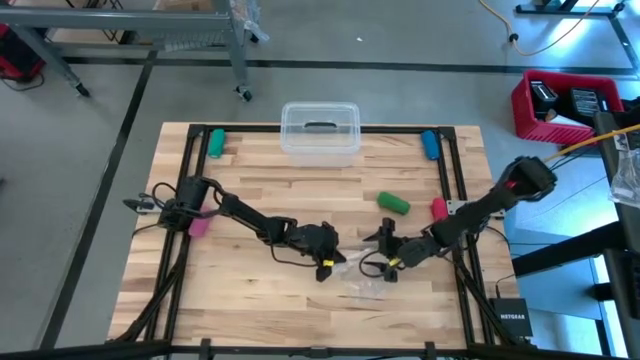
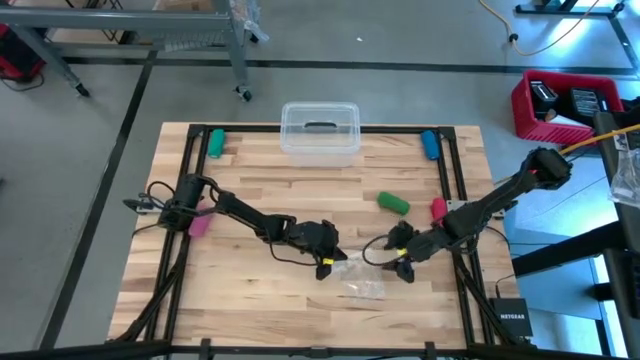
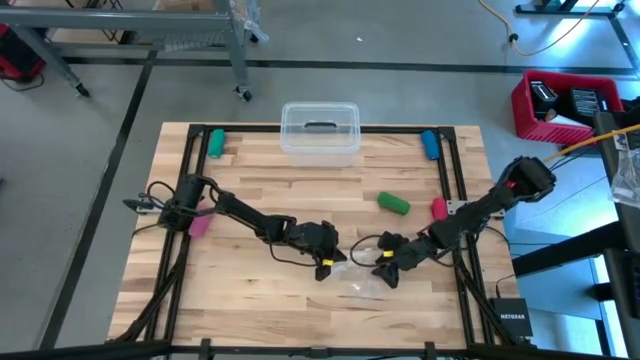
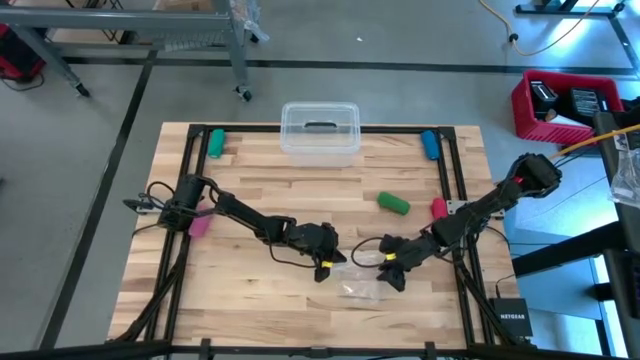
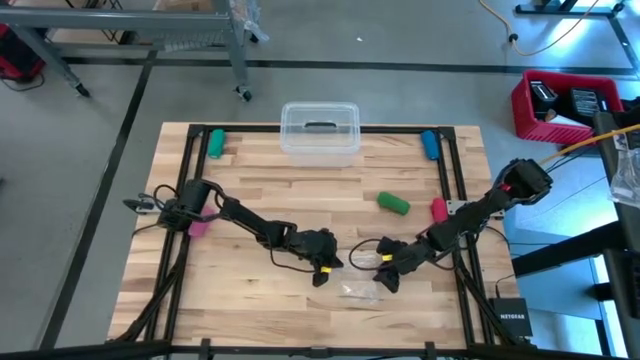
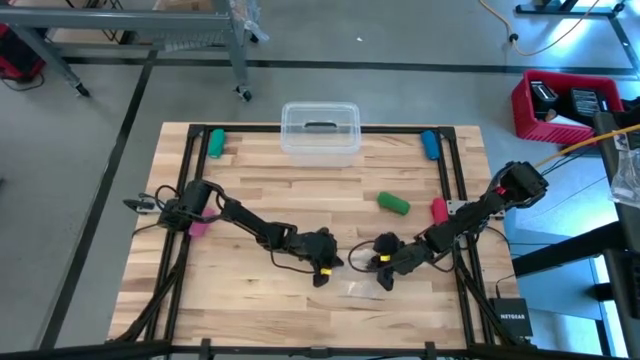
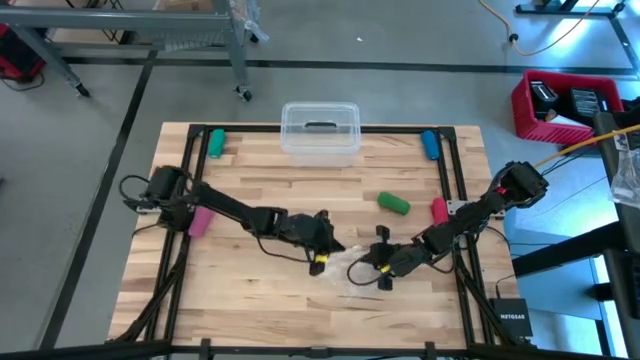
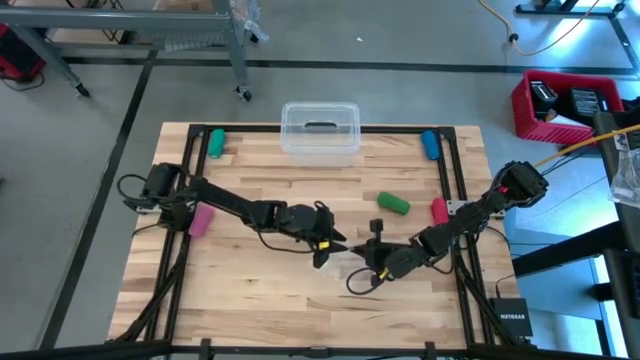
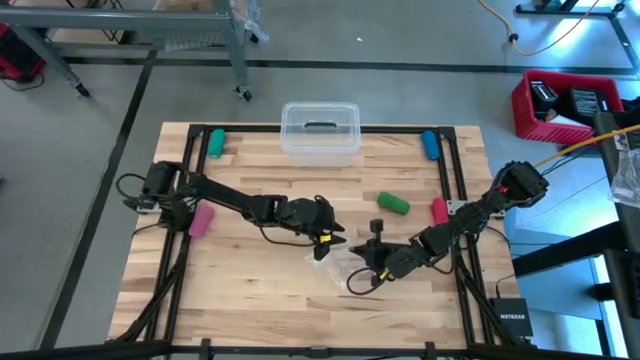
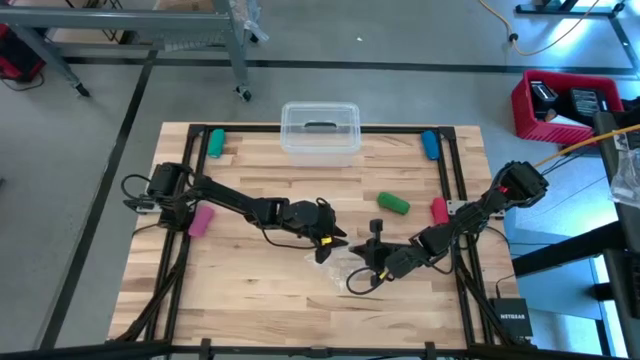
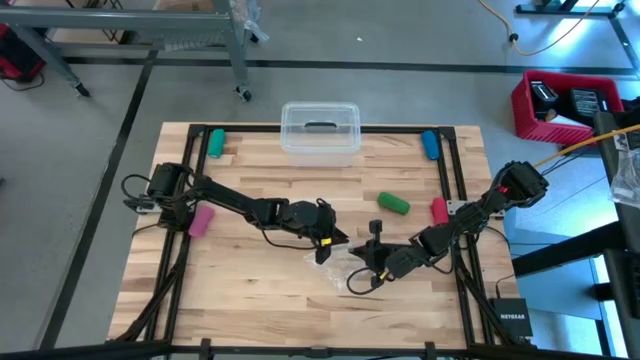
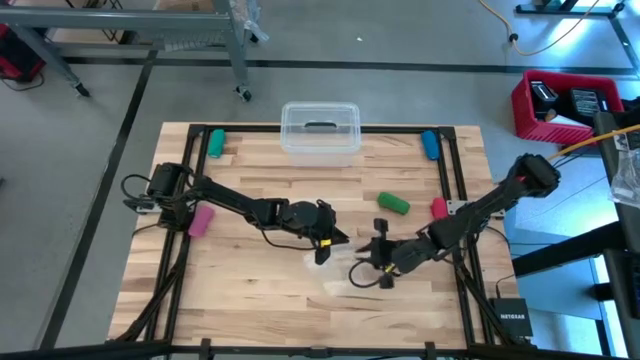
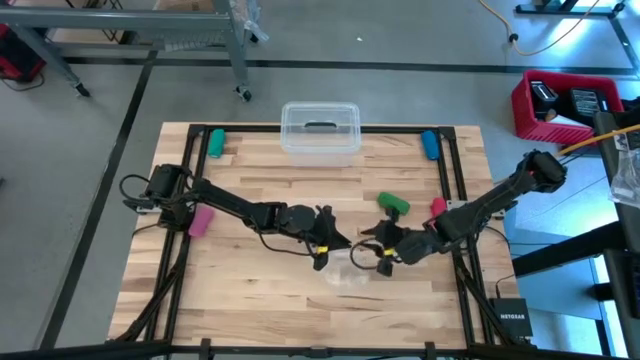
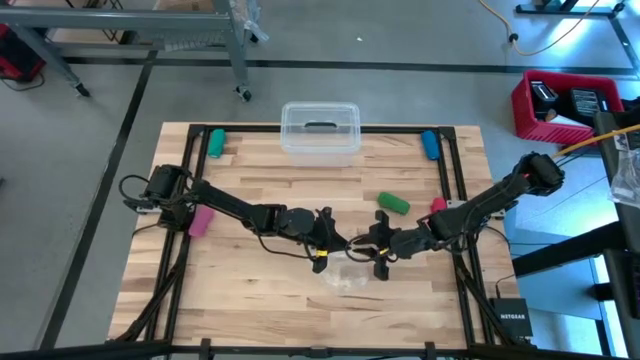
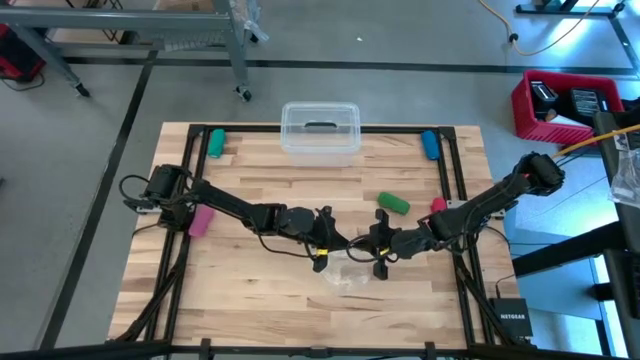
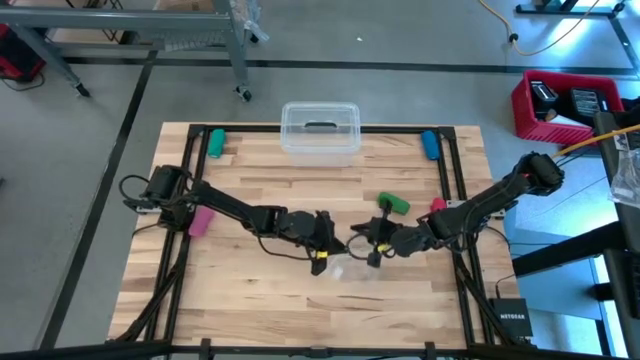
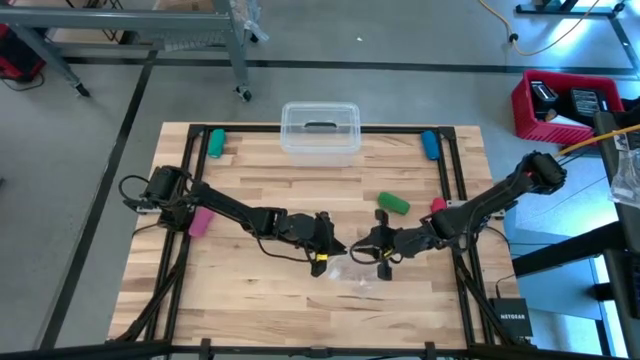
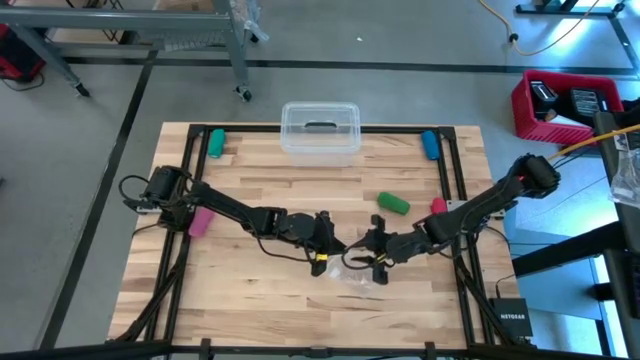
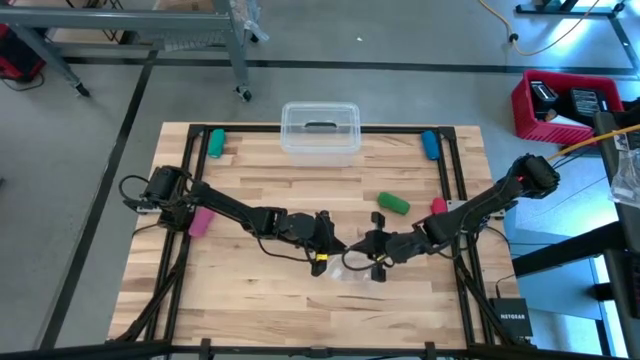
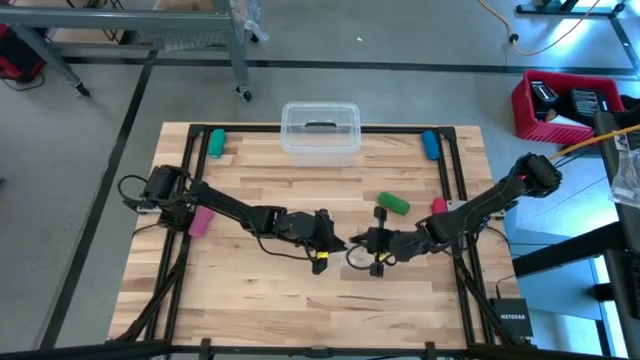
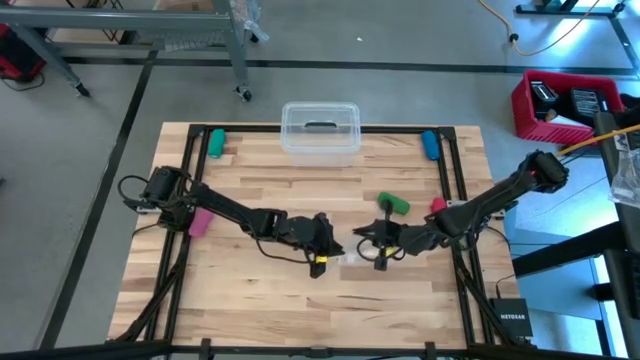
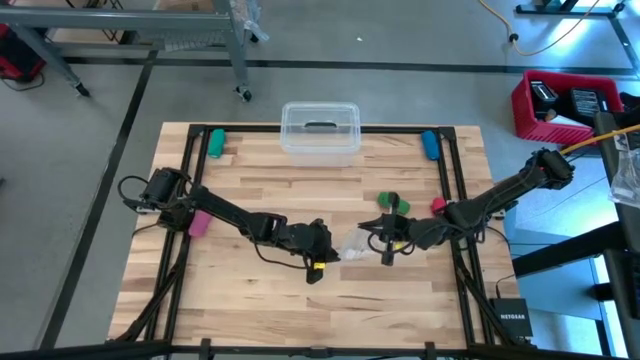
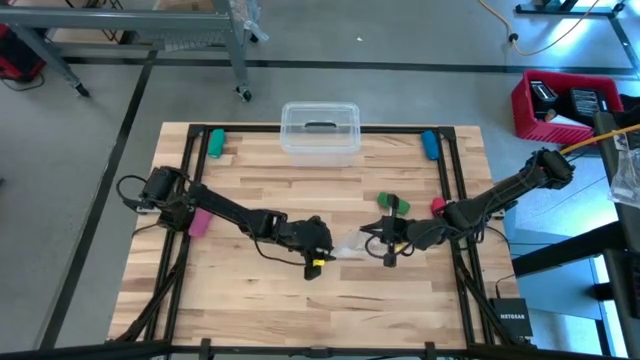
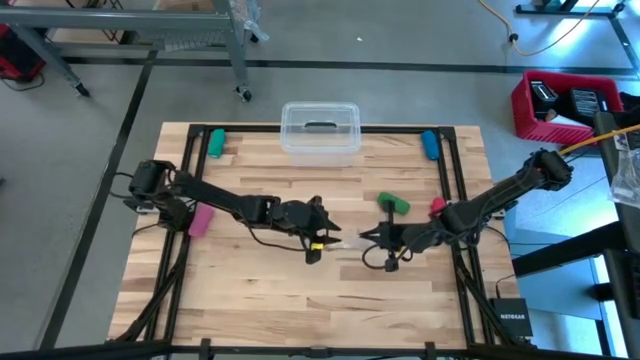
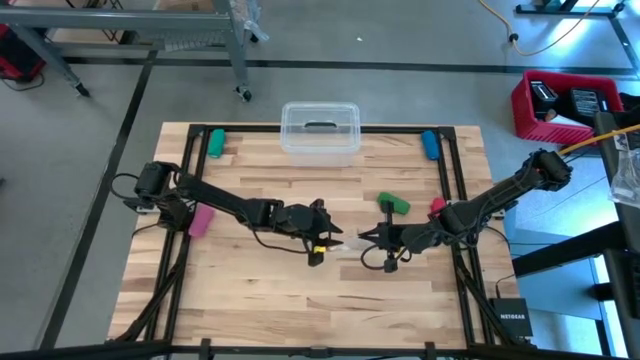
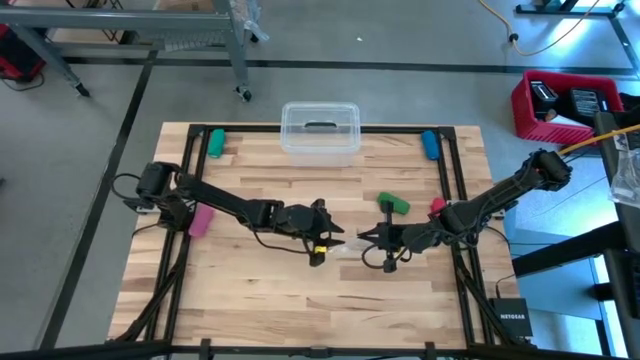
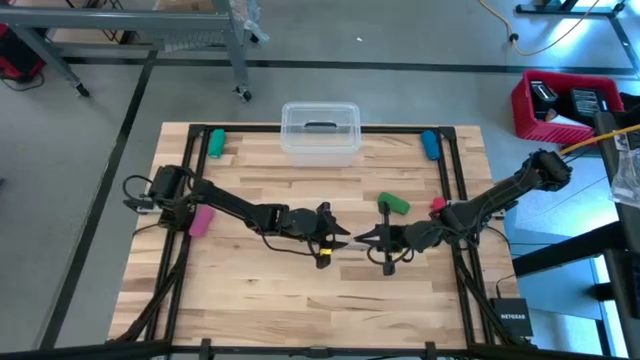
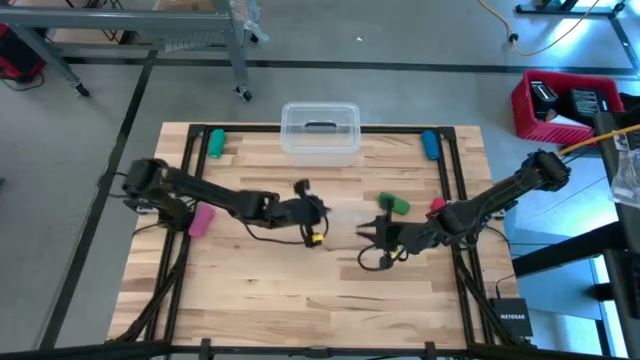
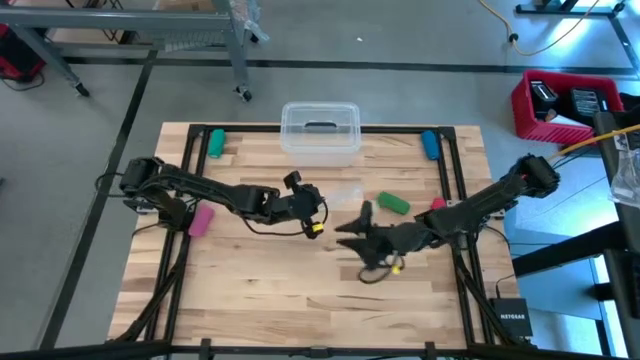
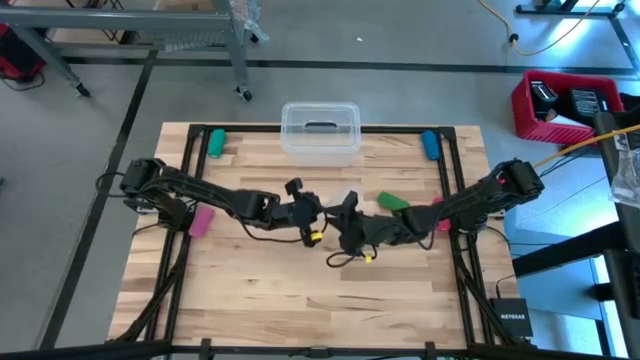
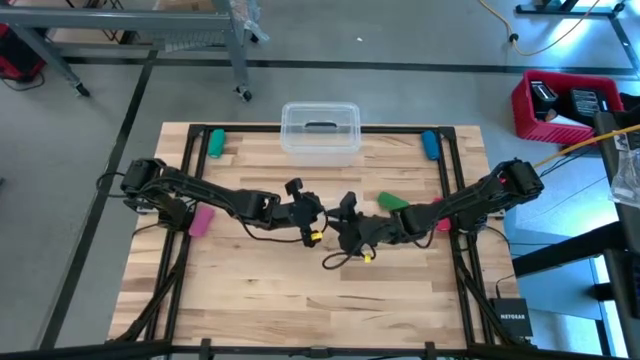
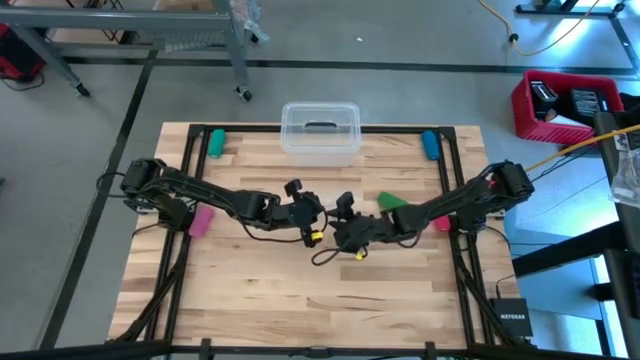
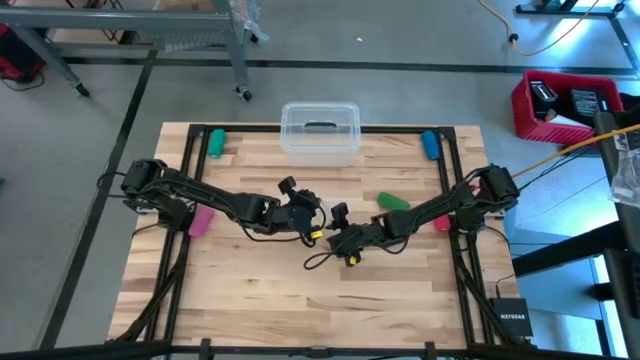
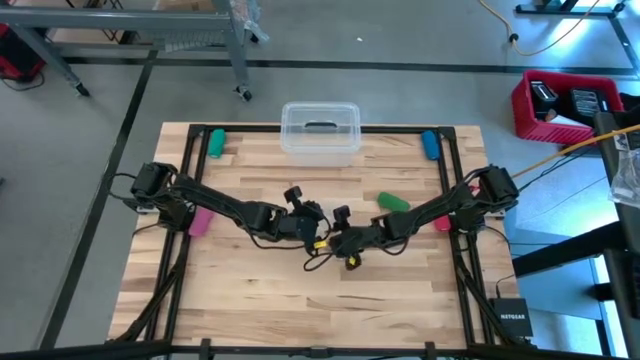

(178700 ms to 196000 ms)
Task: Roll bandage
Open the transparent zip bag

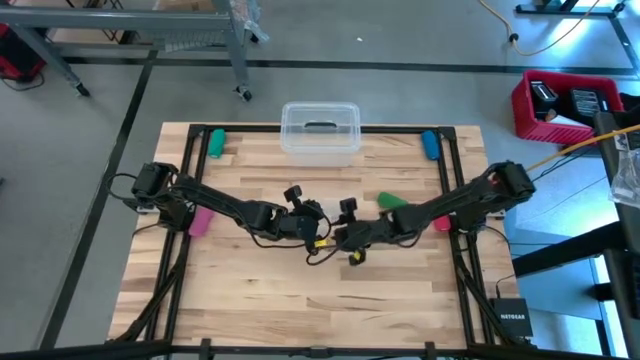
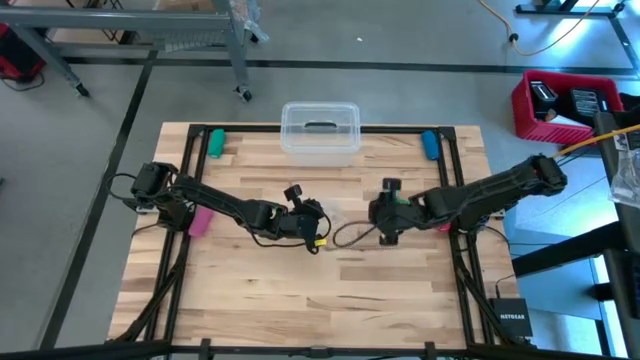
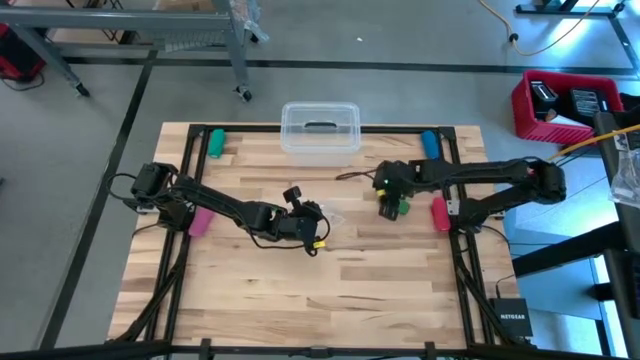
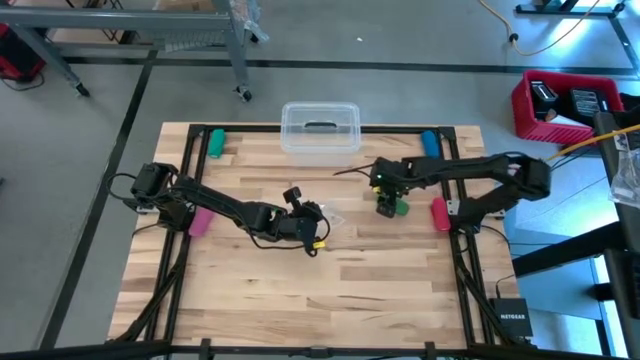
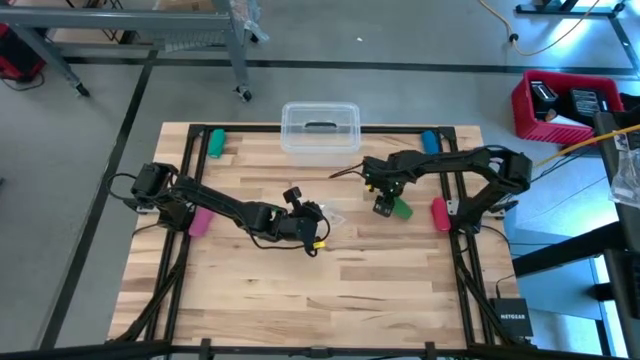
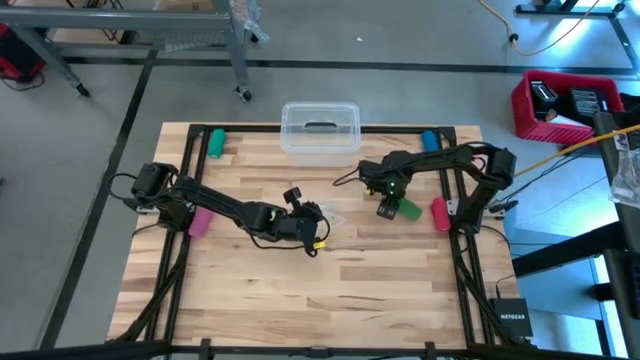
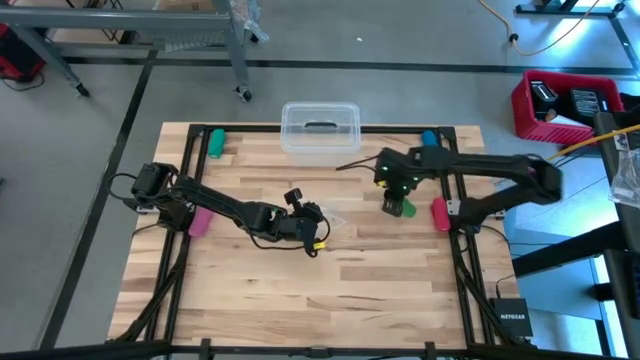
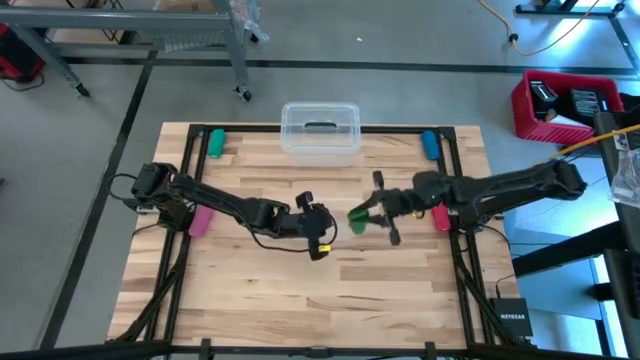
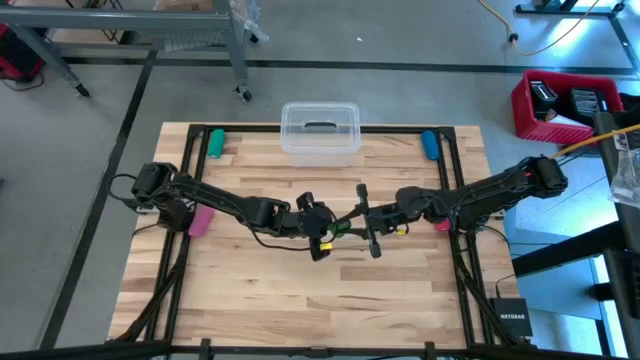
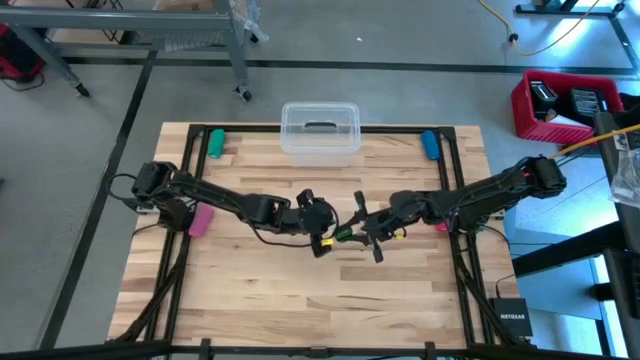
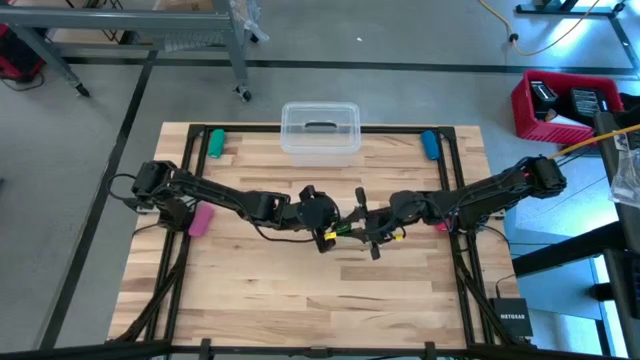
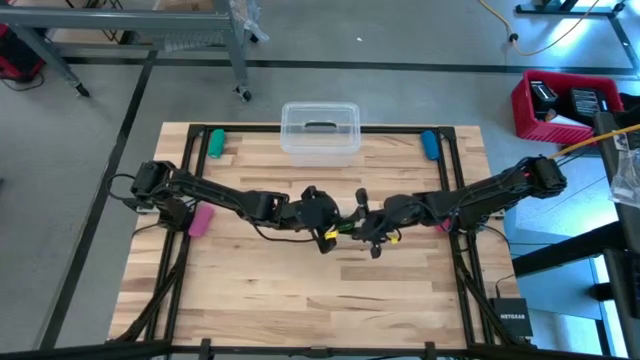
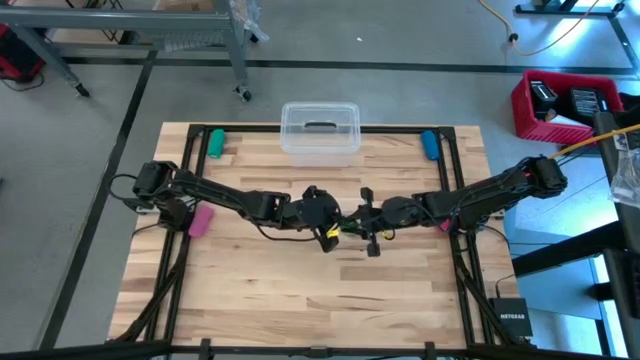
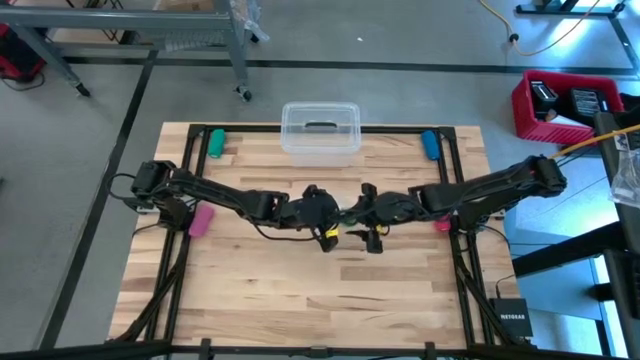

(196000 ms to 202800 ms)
Put the rolled green bandage into the transparent zip bag
